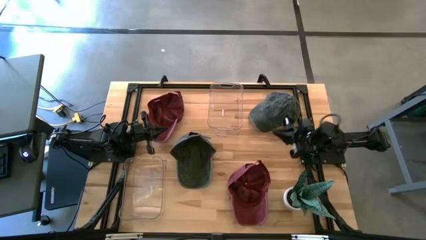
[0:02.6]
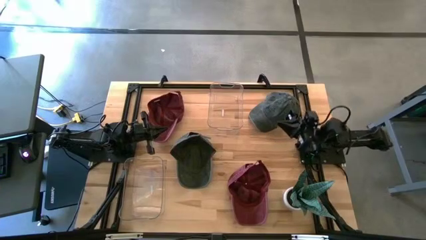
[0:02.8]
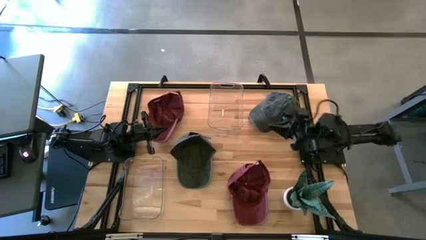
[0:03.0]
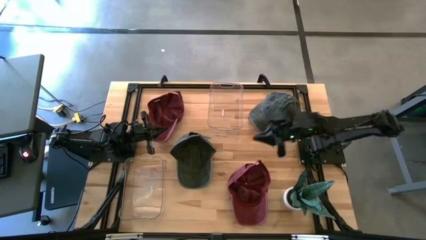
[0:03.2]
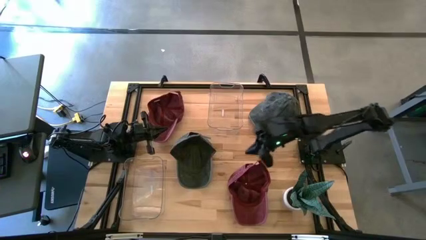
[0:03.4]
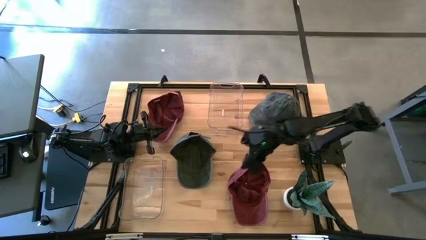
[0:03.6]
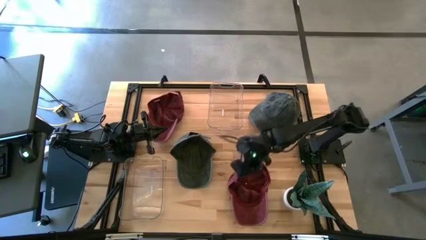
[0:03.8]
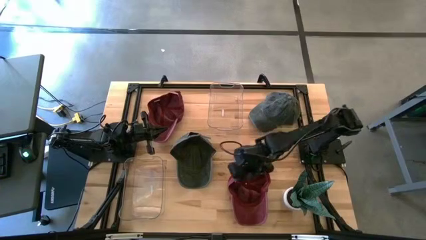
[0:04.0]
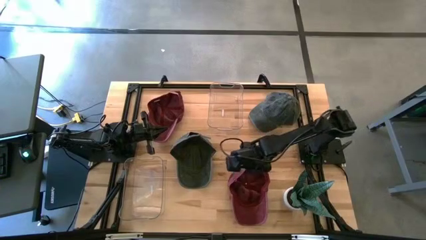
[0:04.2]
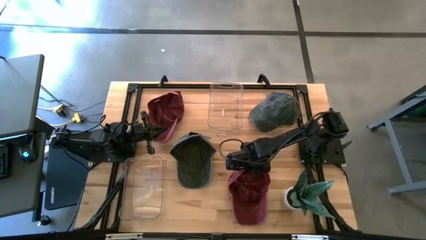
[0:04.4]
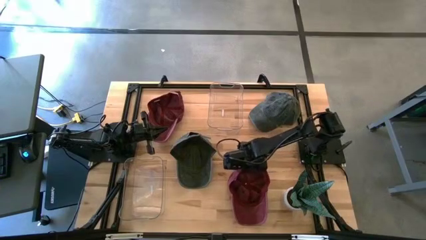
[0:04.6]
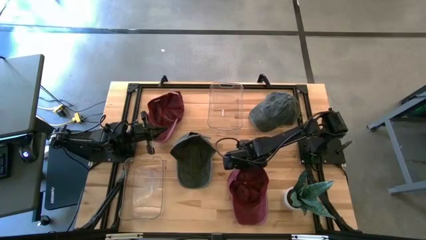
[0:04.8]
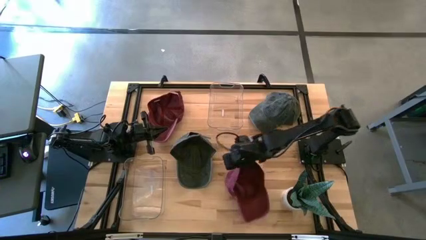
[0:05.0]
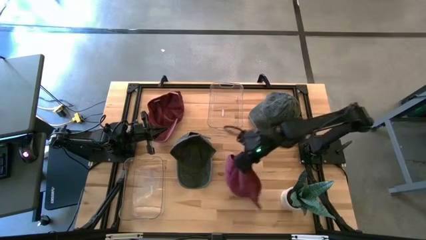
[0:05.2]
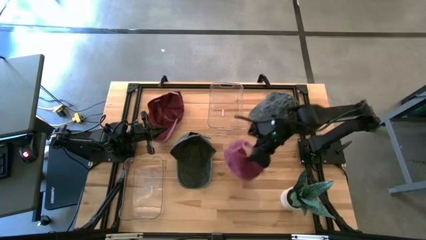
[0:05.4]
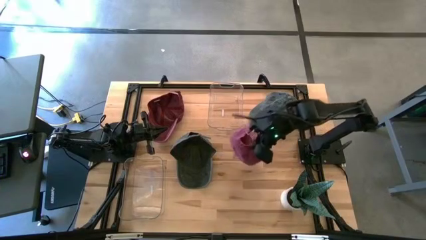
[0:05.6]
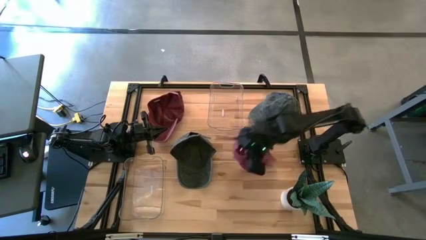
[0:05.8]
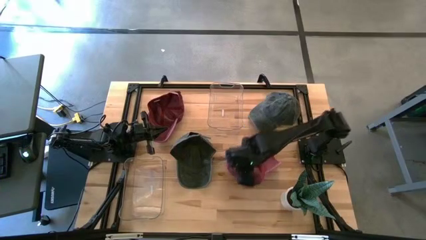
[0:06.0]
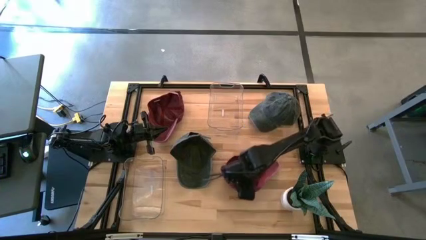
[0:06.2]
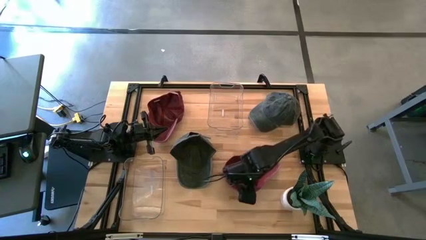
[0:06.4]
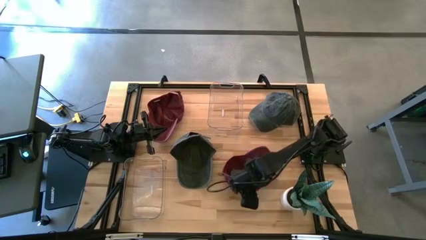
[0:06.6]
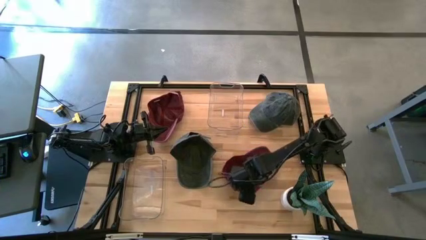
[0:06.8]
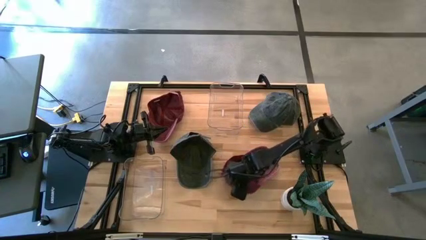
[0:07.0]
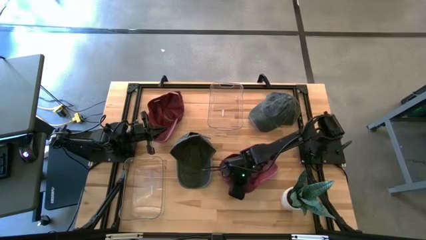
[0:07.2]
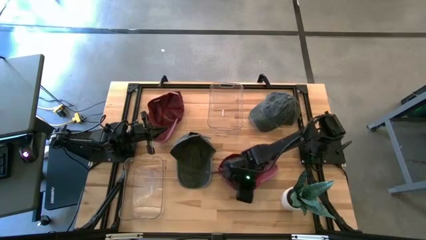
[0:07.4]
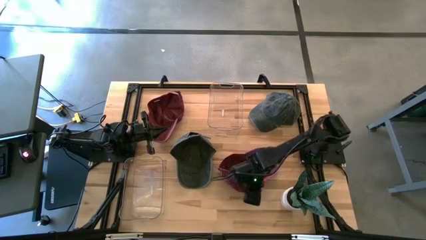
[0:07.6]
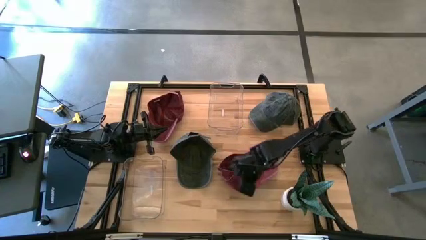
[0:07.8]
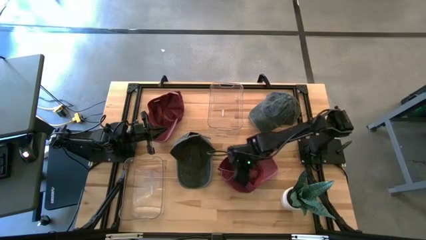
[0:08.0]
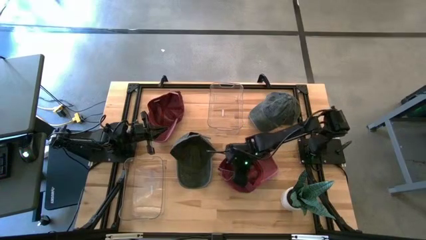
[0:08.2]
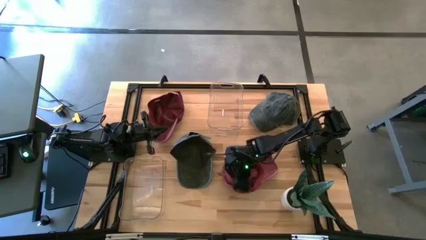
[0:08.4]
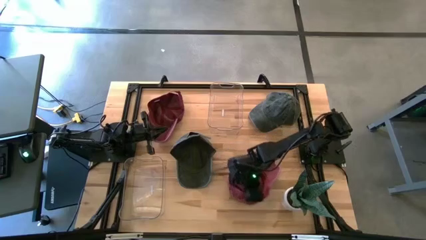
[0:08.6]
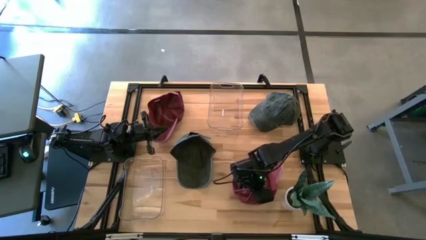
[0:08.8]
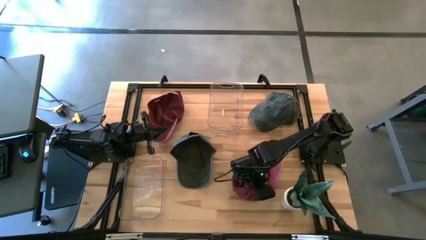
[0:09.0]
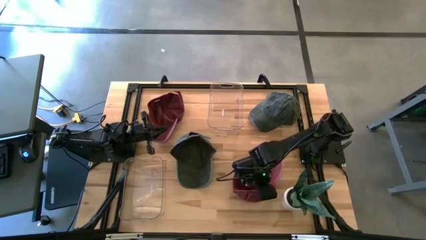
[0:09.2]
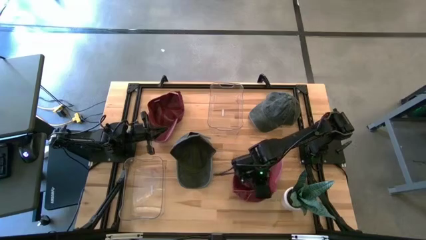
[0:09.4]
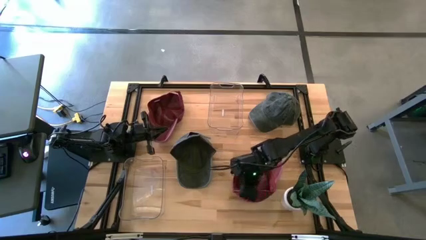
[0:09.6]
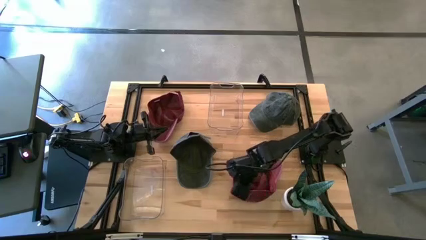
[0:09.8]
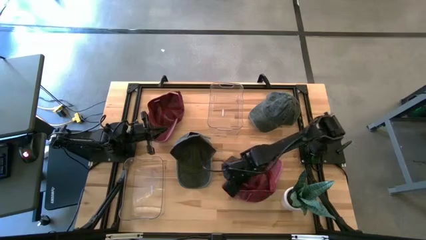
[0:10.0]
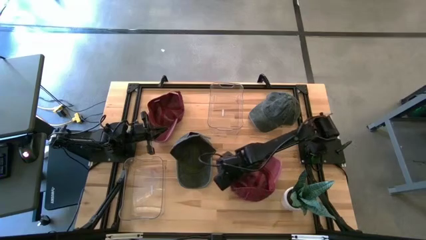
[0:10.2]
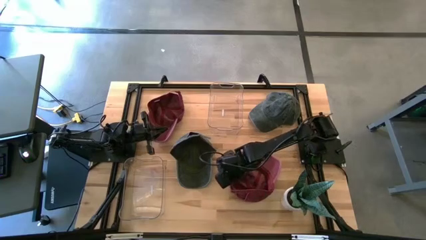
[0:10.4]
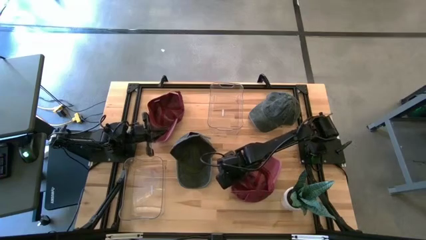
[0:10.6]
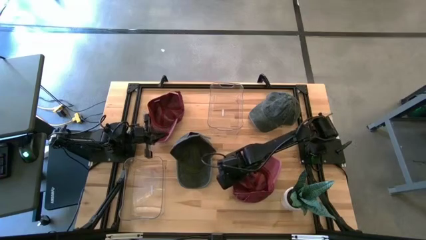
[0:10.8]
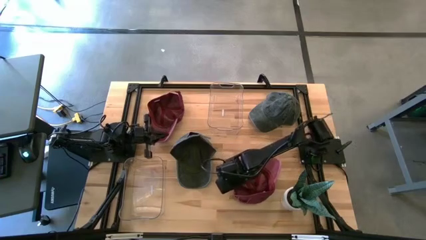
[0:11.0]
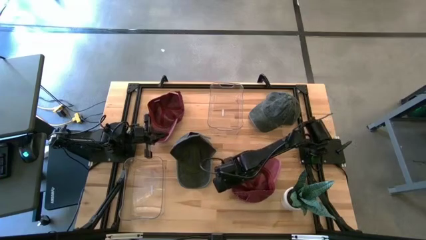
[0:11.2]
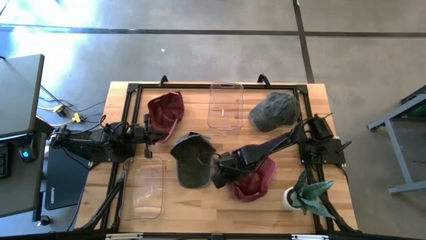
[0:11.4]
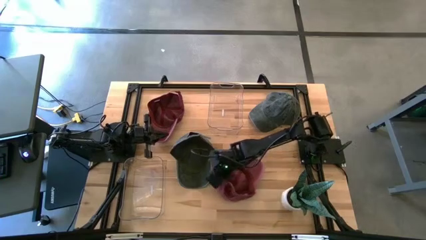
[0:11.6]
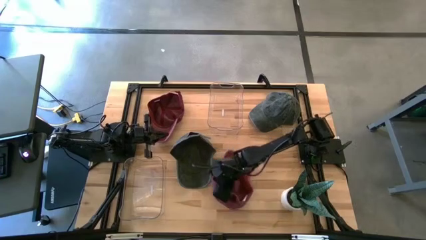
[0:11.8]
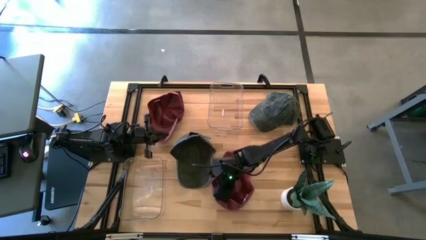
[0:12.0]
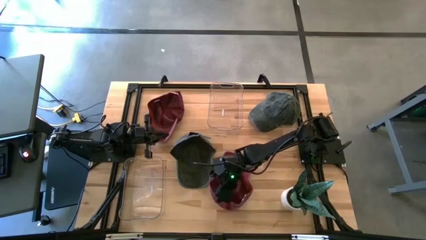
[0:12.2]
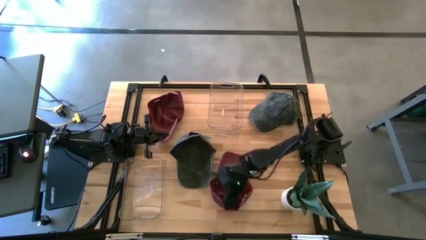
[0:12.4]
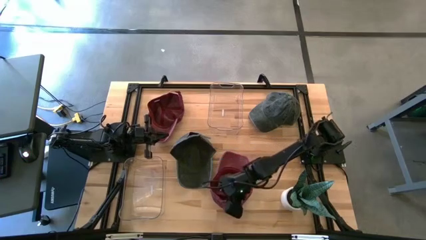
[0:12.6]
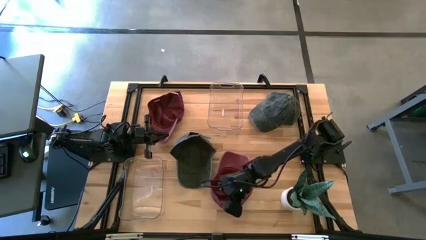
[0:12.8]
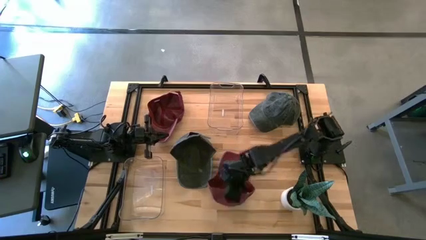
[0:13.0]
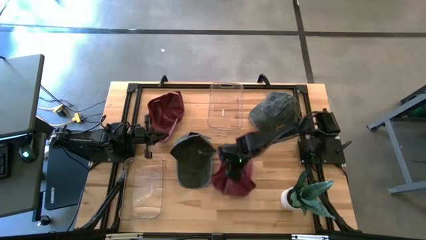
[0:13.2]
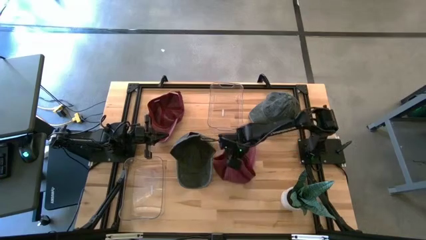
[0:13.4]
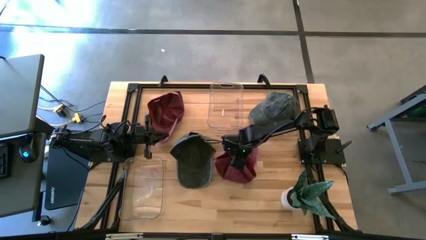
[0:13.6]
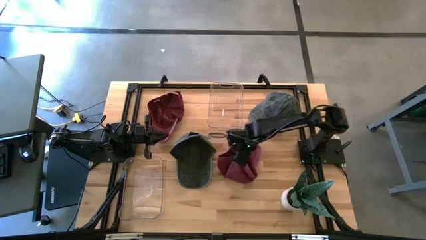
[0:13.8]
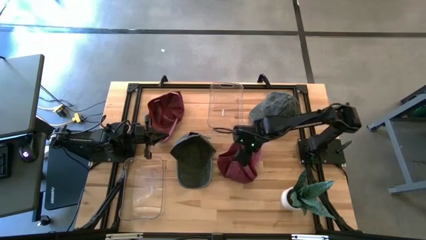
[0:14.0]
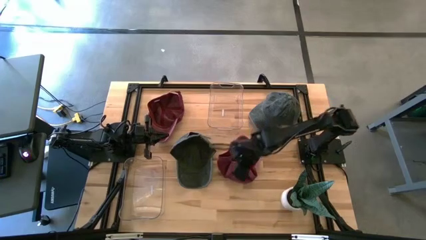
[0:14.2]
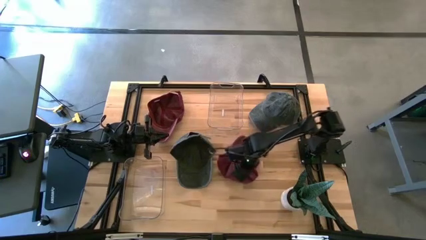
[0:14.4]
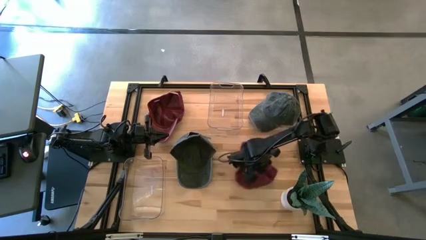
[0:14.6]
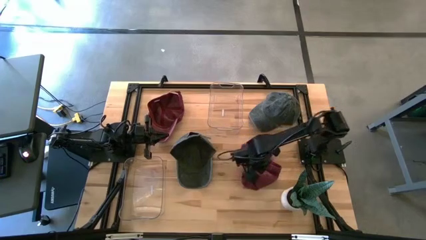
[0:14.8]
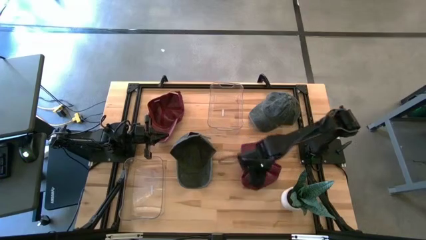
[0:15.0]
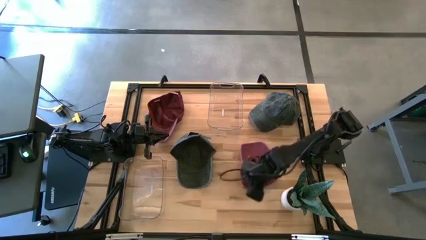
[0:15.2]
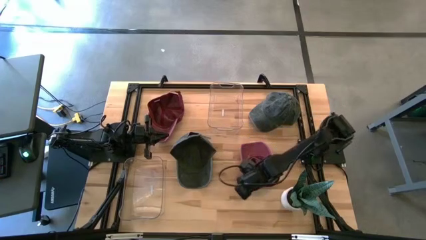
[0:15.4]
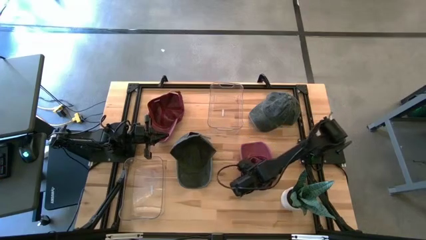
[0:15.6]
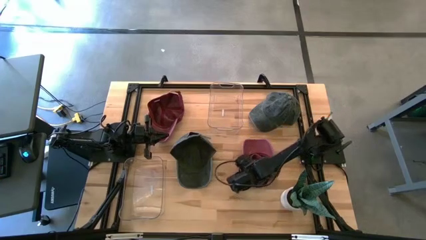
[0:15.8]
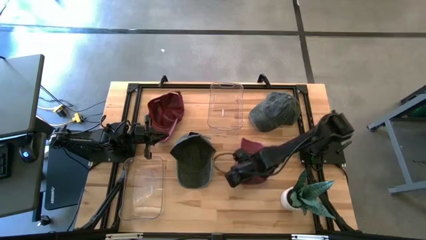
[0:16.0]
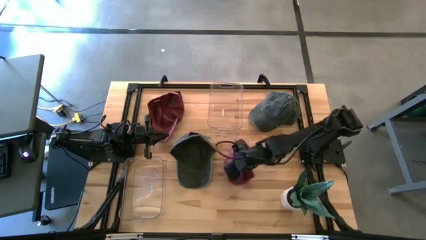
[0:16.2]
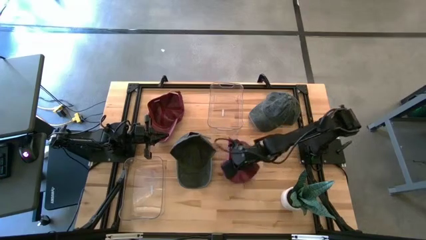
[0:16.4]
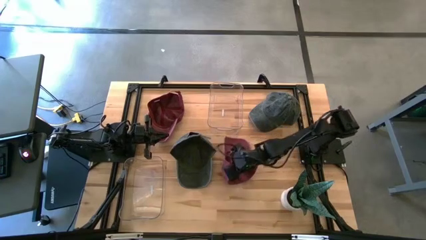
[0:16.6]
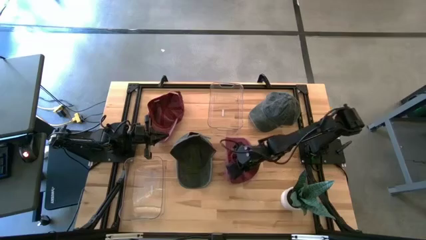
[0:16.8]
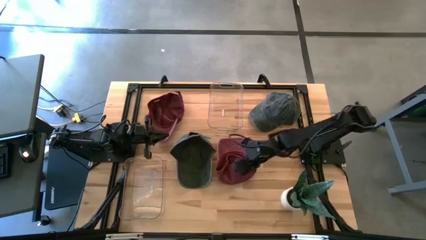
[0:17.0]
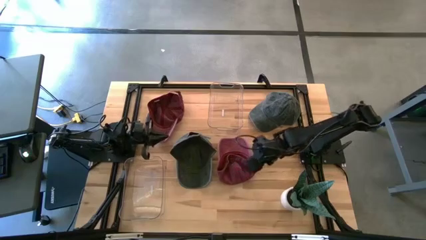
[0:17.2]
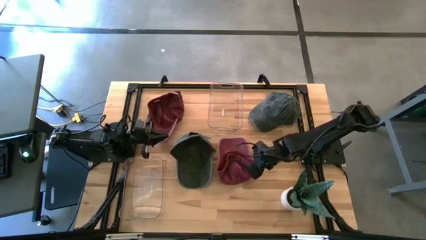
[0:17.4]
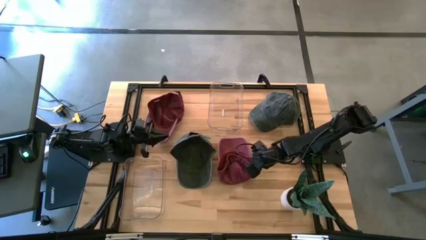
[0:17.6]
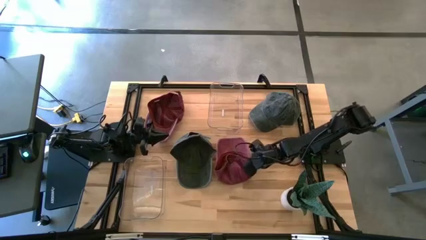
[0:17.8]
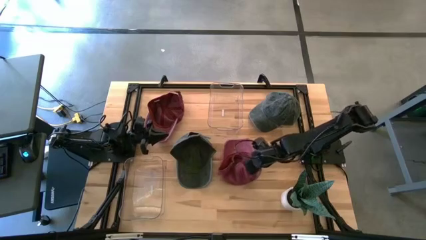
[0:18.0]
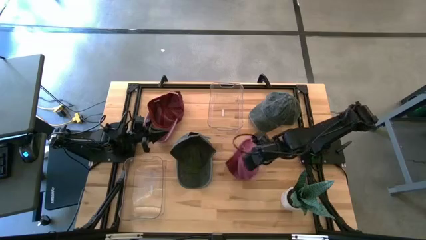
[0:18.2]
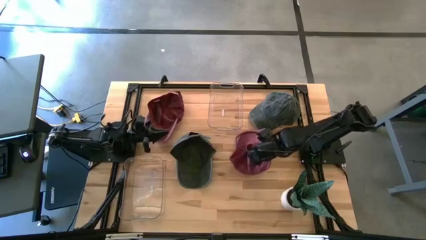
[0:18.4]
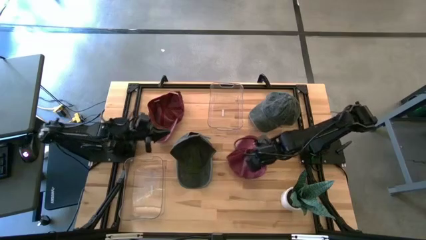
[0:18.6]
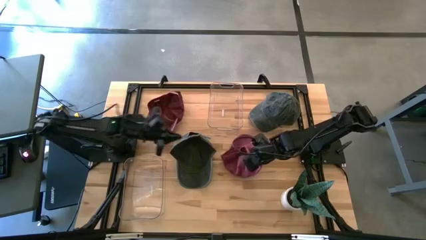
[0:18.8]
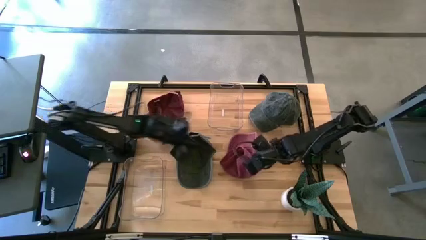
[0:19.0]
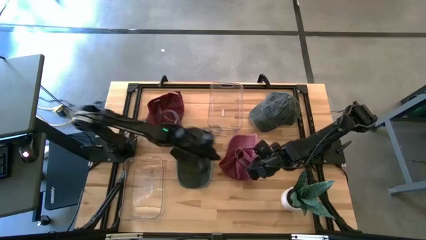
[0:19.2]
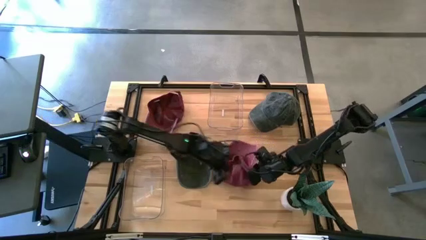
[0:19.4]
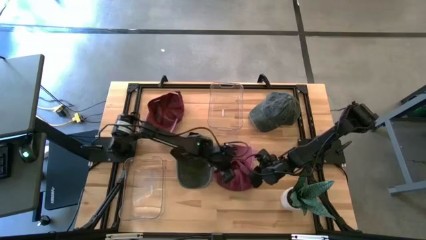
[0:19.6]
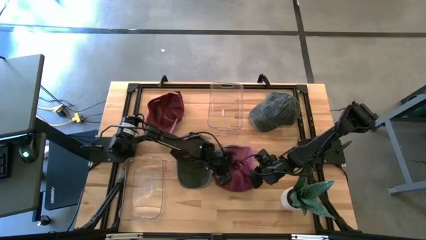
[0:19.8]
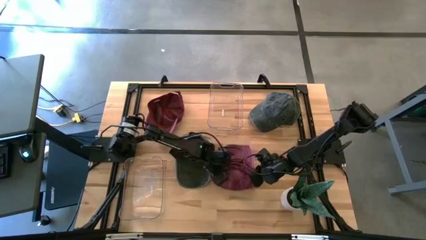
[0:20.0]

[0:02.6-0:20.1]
Task: Pick & Place hat
Put the bottom maroon cap into the top transparent bin
